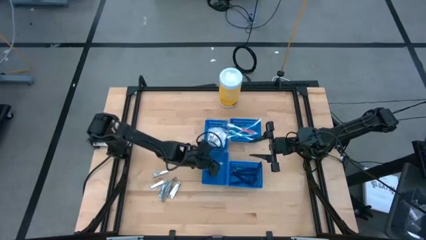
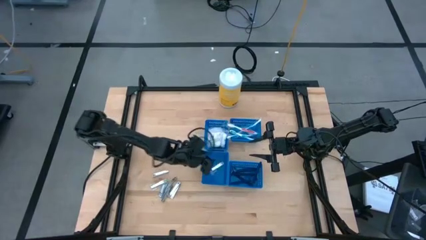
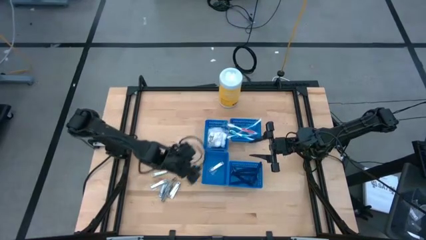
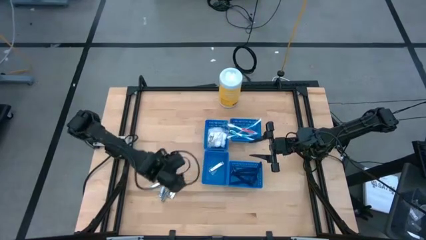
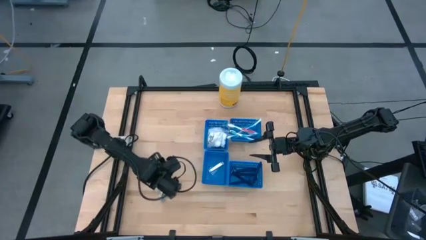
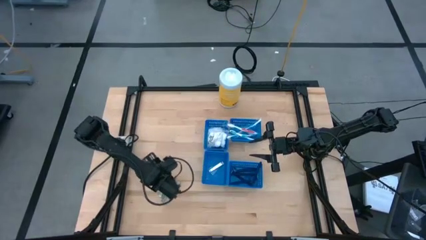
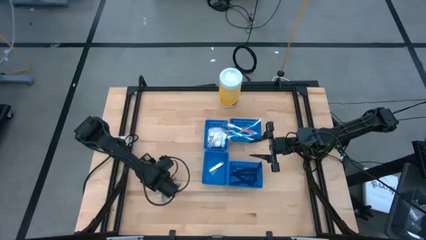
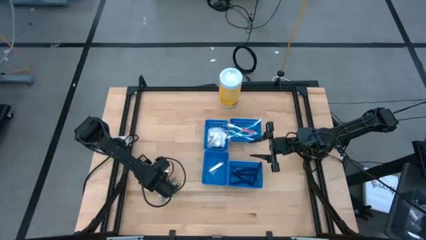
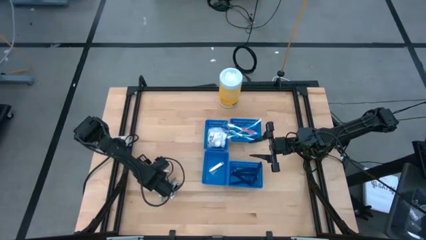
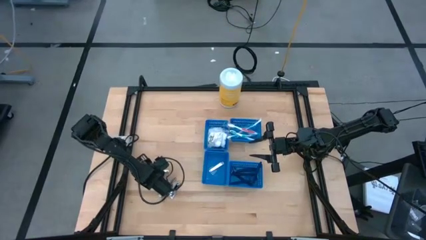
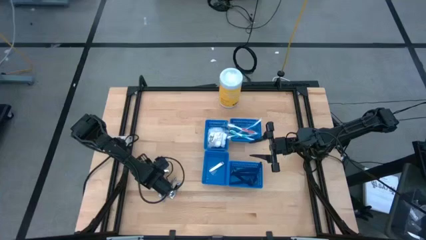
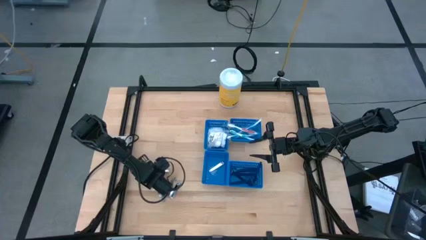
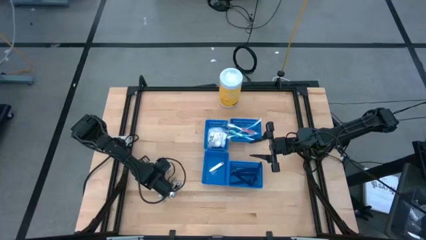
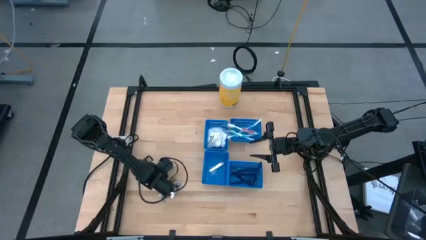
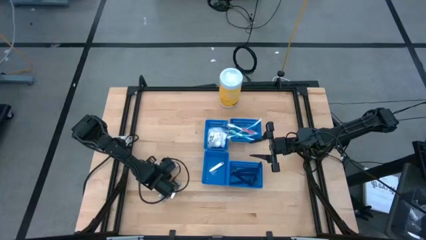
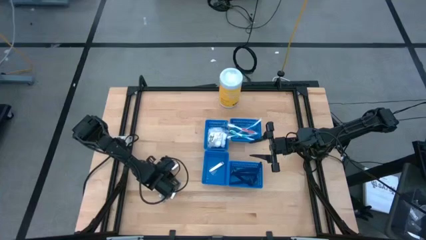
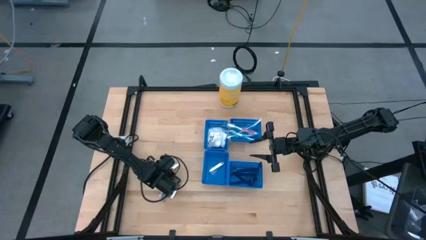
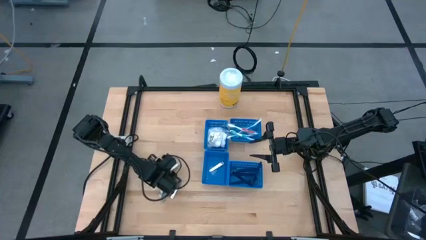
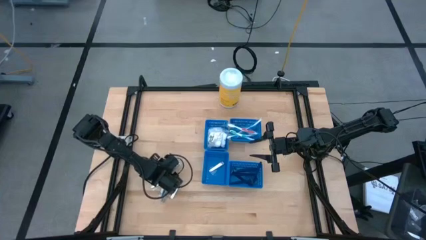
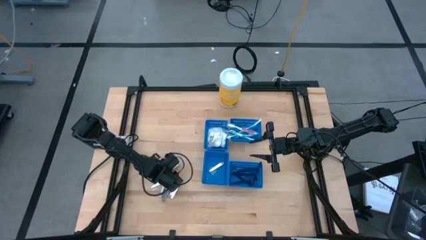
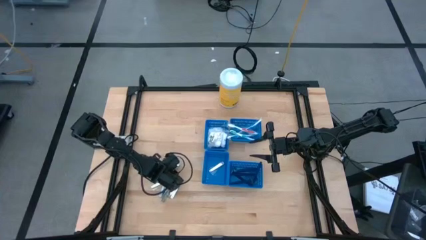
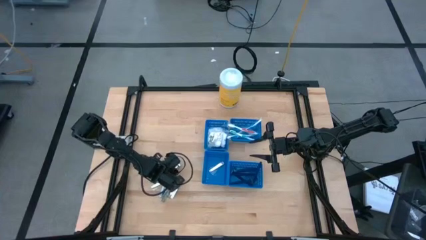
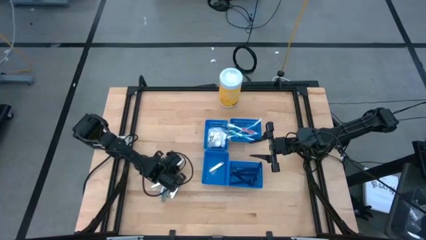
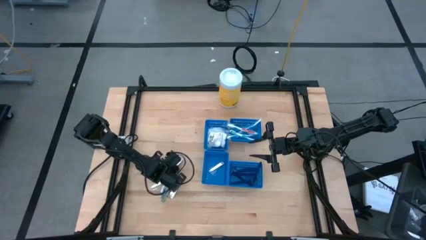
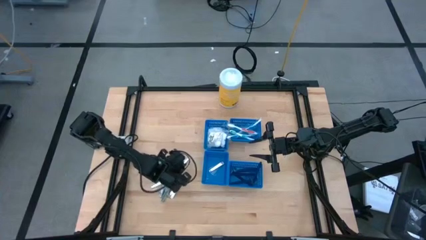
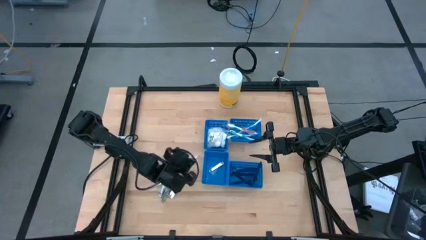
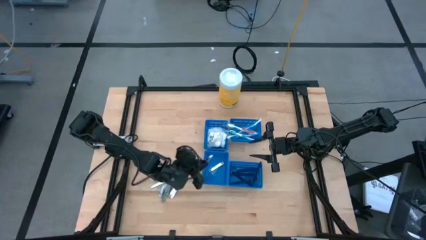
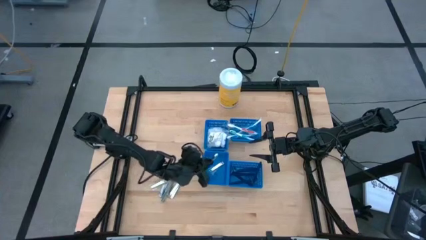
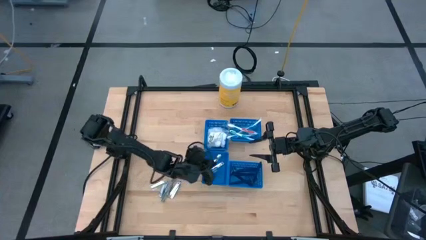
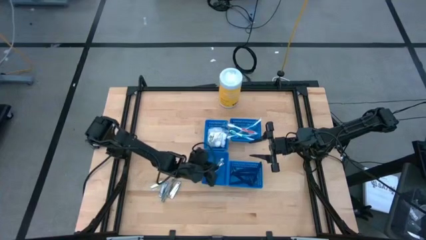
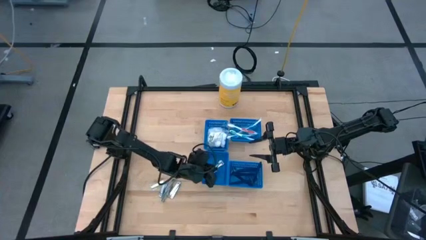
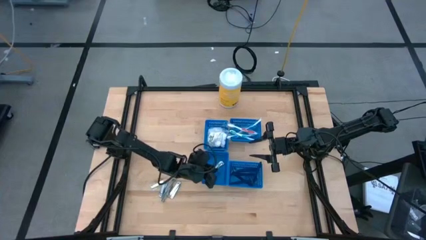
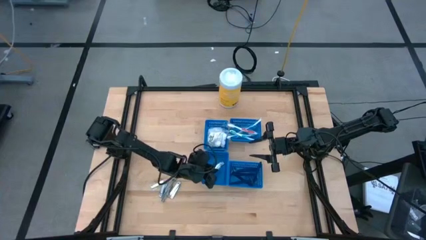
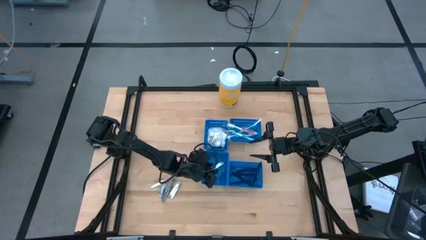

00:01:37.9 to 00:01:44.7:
Task: Pick & Place Travel size toiletries
Put the silver nail cutter into the bottom left blue bin

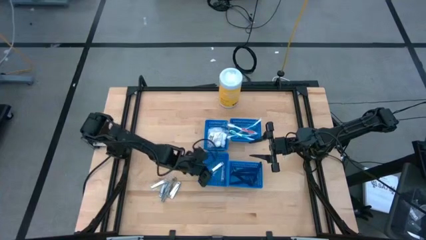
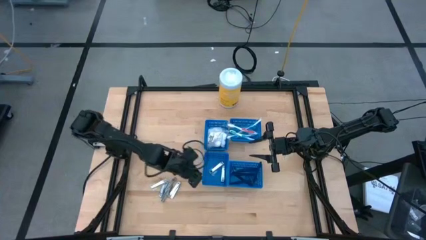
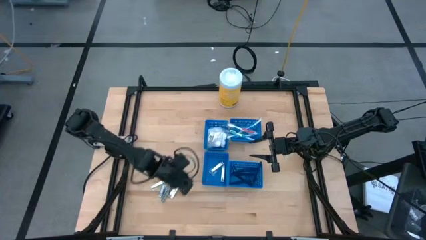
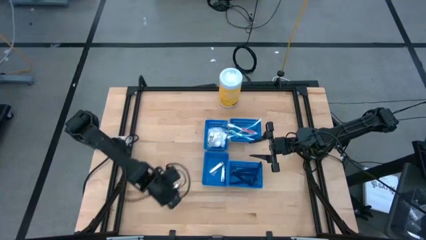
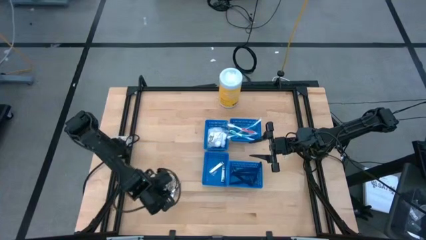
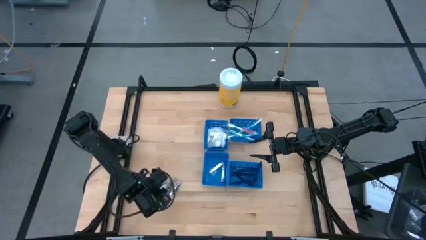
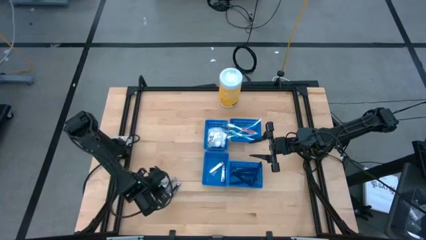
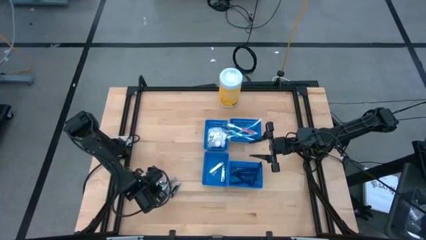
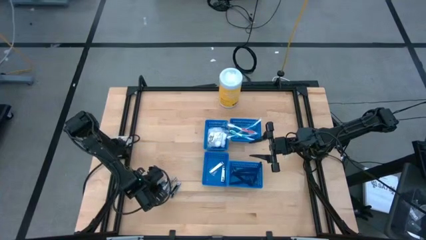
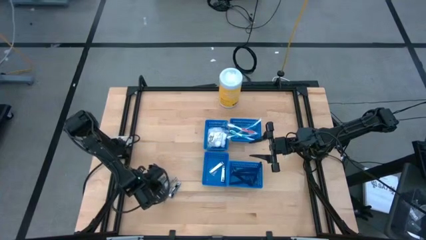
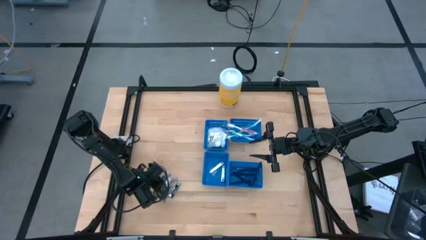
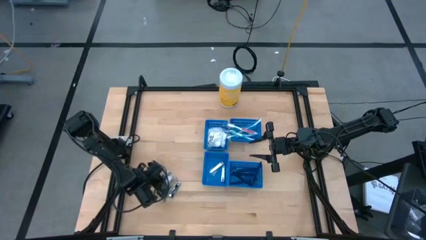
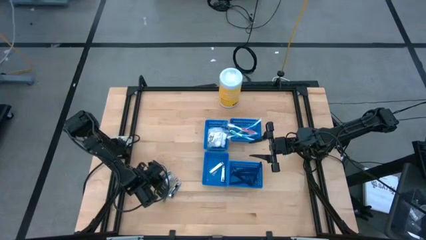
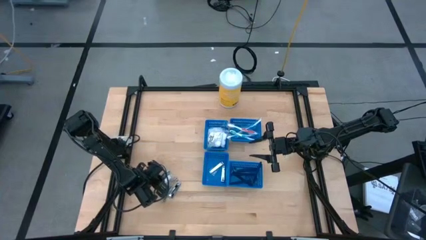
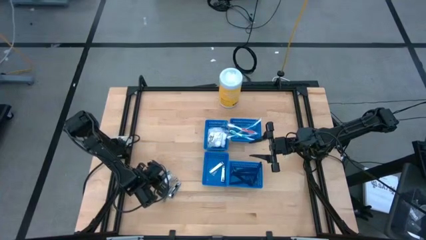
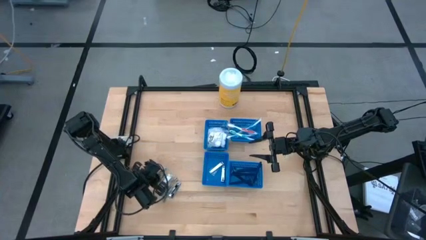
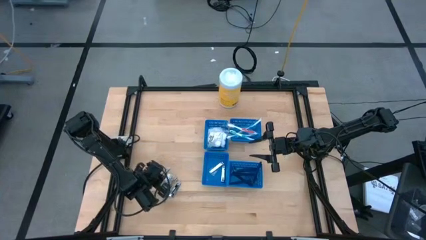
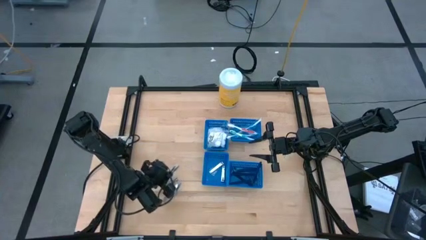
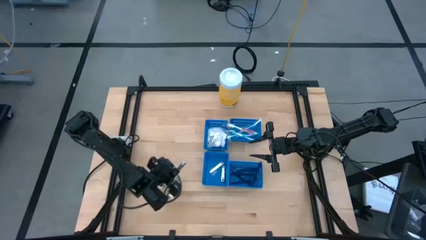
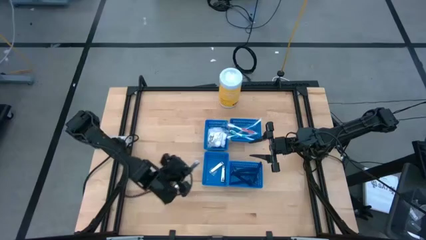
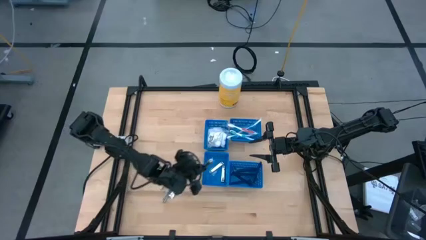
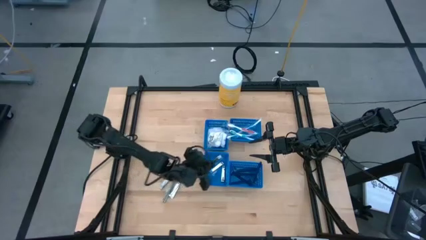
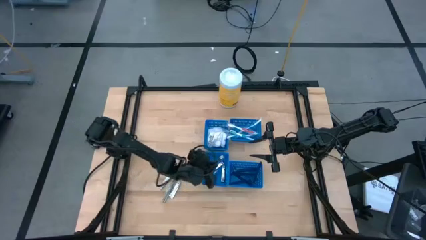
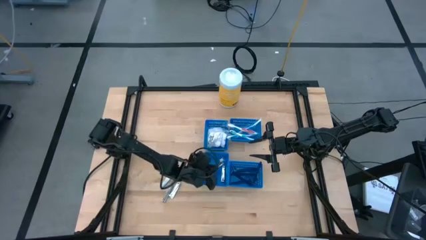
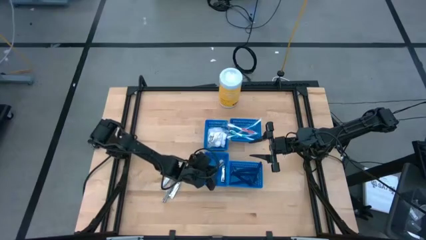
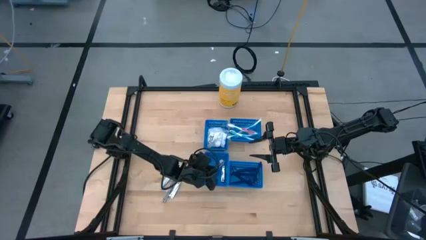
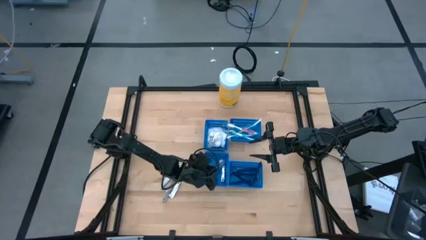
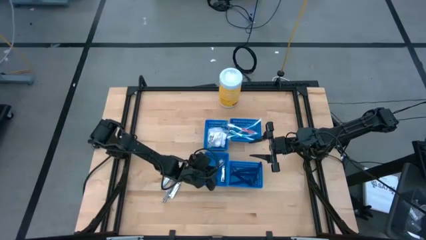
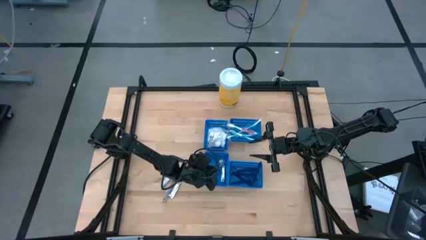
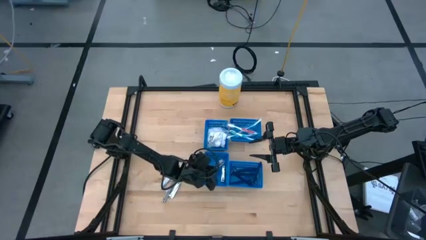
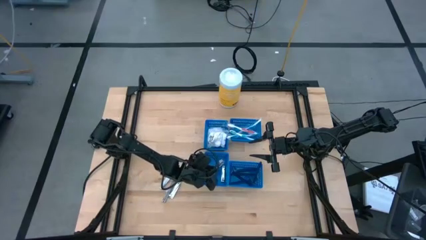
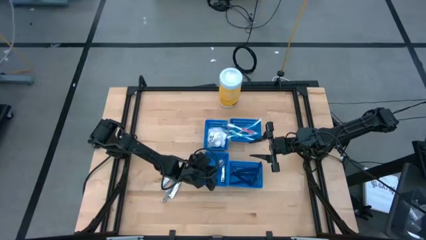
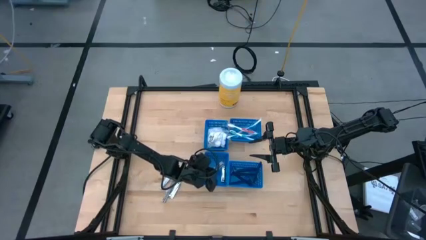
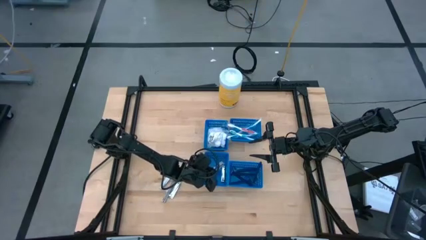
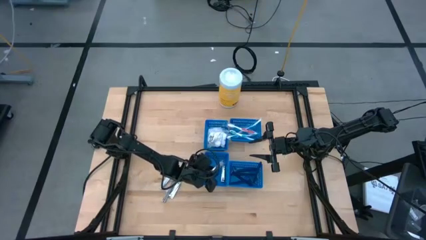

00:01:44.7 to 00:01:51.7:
Put the silver nail cutter into the bottom left blue bin
